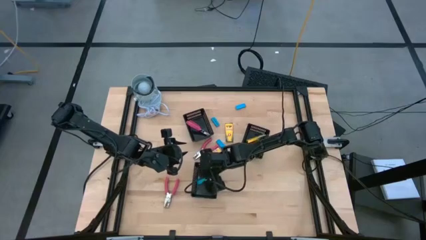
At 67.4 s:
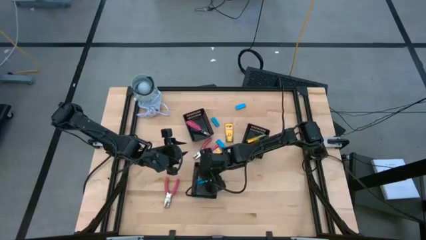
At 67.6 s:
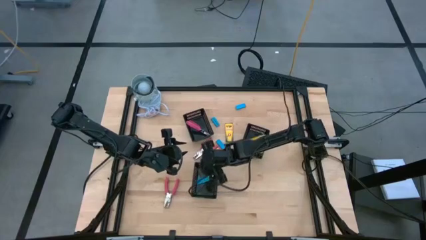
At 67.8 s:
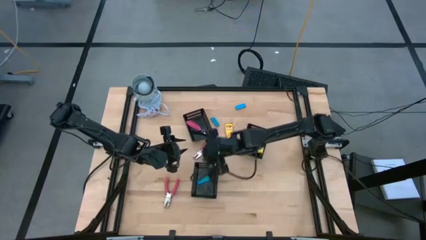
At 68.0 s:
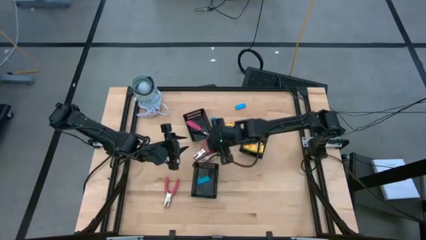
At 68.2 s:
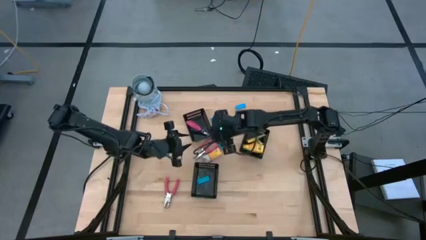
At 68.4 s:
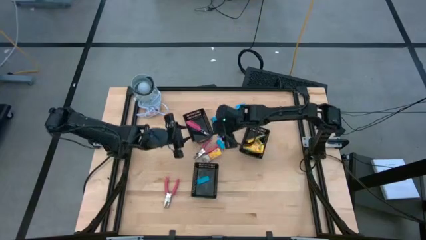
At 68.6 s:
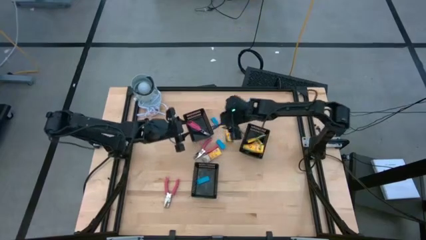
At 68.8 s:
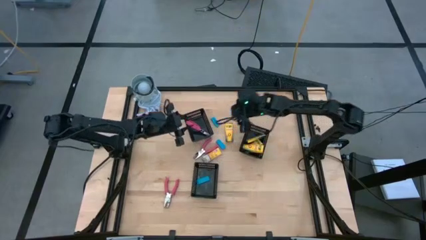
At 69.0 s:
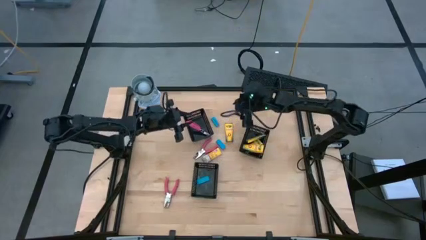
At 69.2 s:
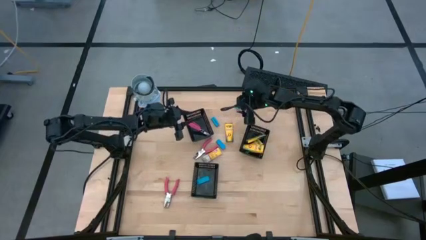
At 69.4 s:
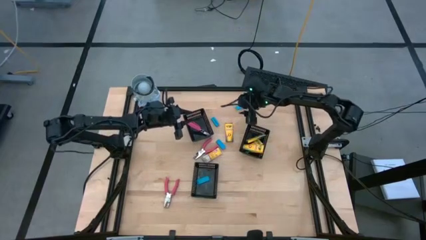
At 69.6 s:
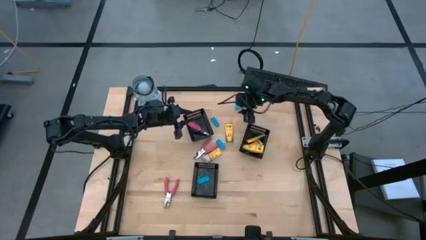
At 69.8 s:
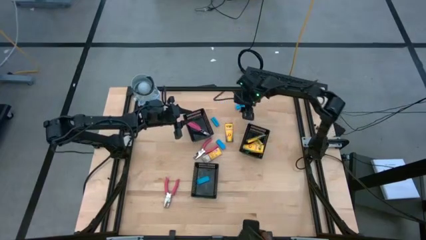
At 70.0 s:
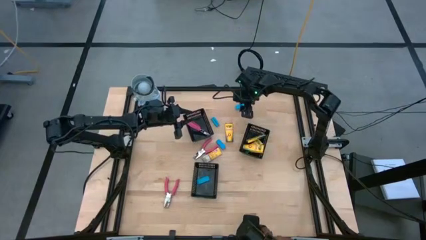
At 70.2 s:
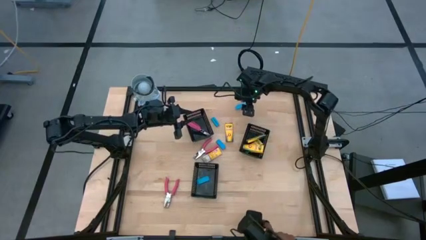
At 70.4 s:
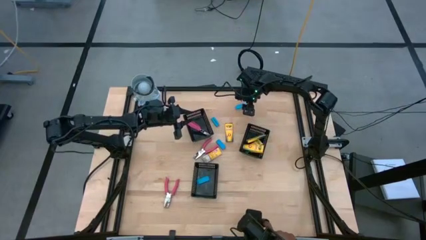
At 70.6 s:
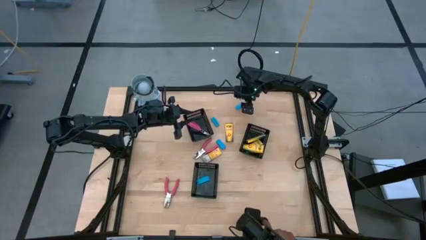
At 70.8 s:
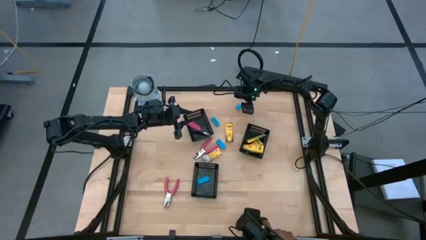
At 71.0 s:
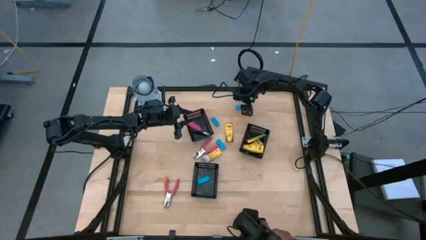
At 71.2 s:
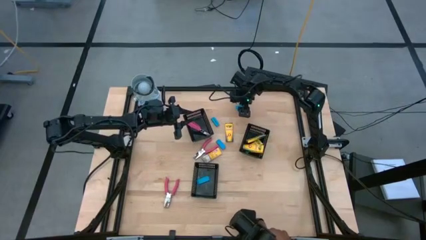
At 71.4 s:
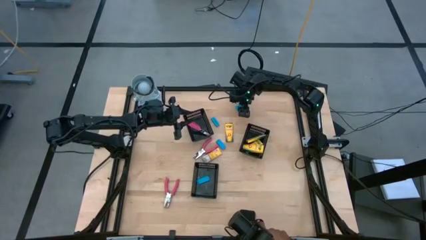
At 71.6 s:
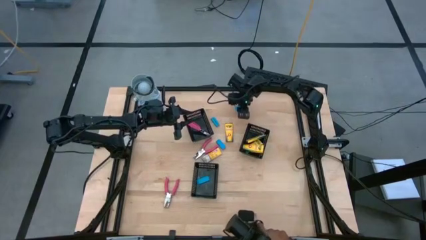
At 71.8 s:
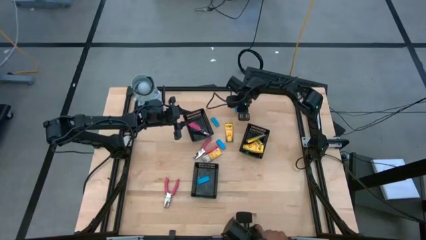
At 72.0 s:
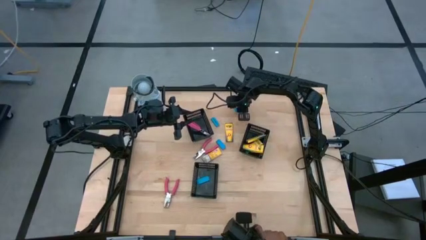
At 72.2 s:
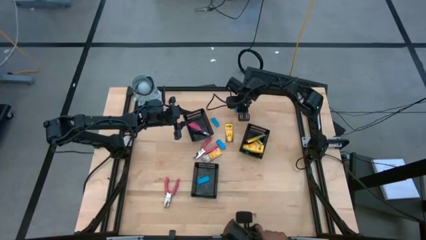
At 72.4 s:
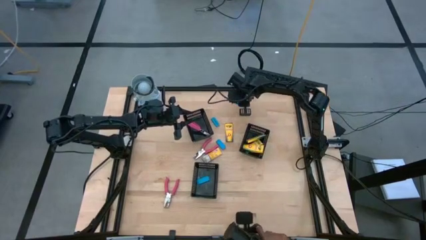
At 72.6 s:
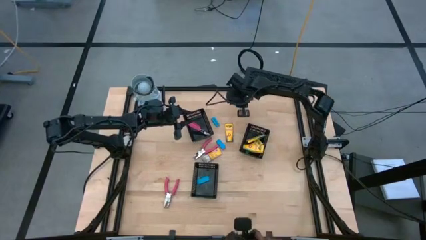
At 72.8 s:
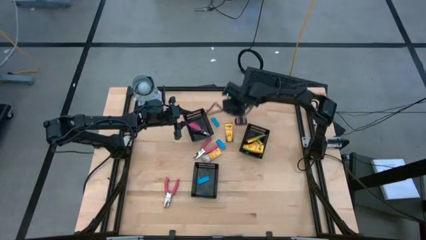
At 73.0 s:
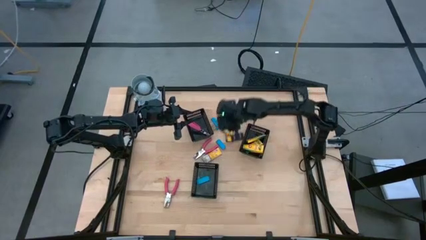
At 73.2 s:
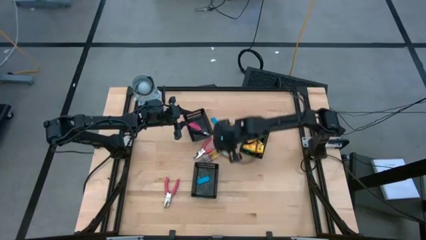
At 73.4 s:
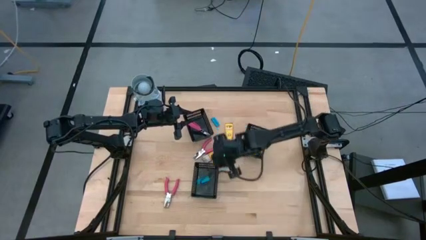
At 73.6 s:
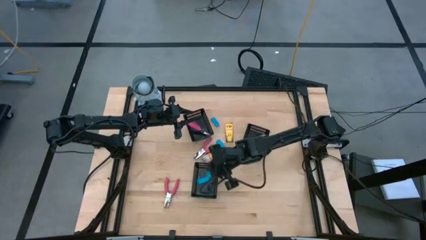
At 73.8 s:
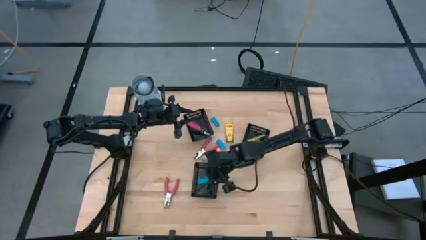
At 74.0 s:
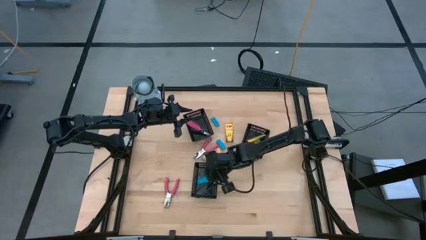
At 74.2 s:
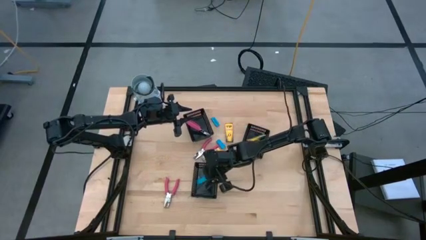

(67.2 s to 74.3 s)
Task: Pick & Place School Supplies
Put the blue eraser into the bottom left black basket

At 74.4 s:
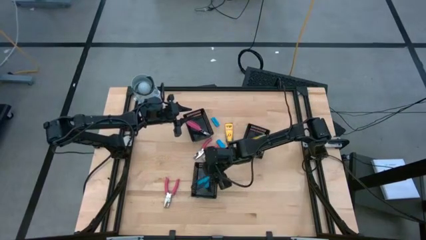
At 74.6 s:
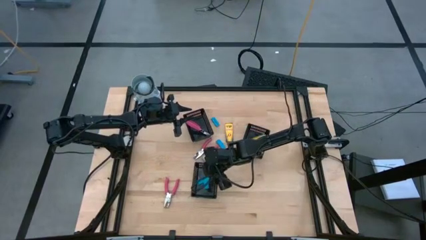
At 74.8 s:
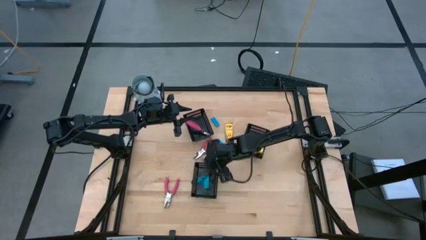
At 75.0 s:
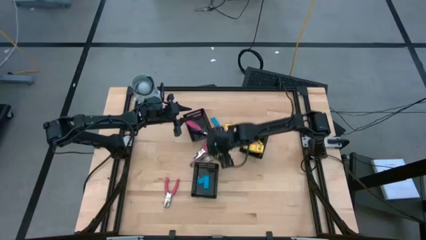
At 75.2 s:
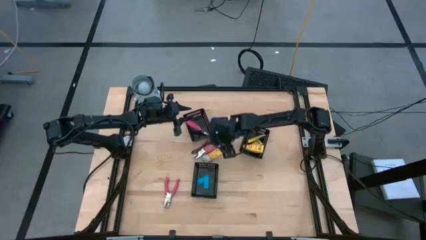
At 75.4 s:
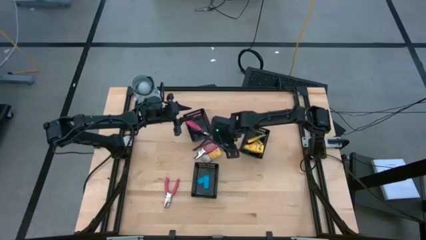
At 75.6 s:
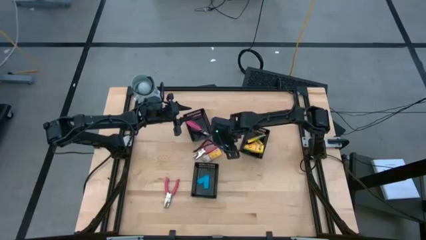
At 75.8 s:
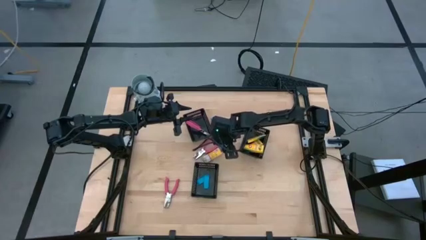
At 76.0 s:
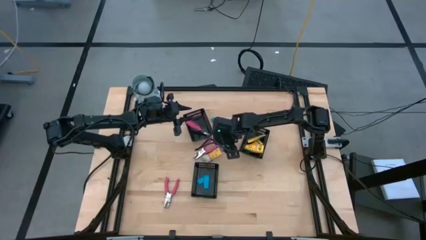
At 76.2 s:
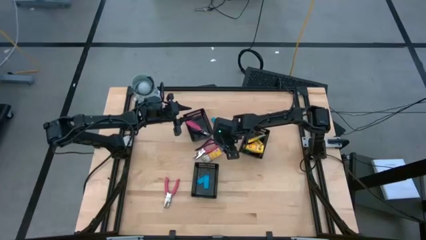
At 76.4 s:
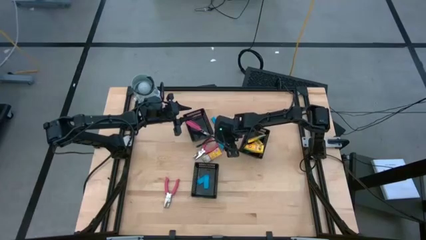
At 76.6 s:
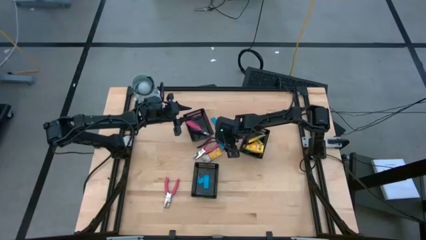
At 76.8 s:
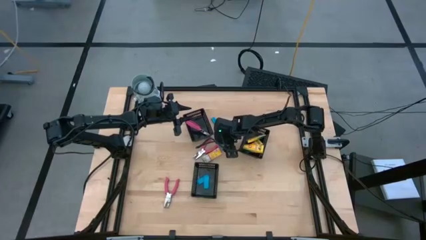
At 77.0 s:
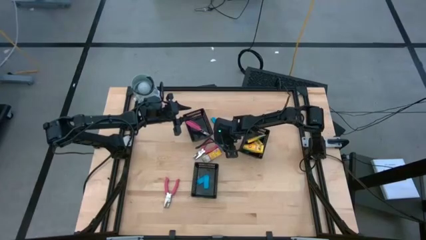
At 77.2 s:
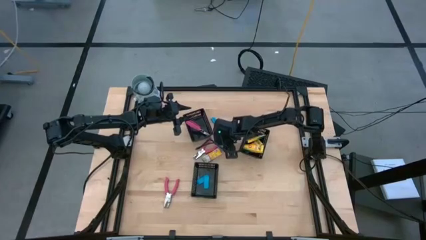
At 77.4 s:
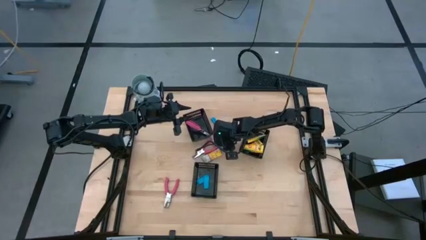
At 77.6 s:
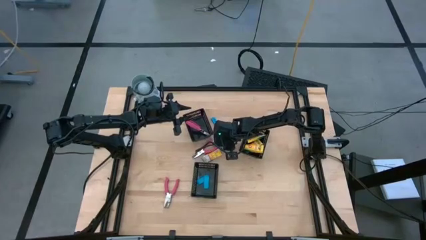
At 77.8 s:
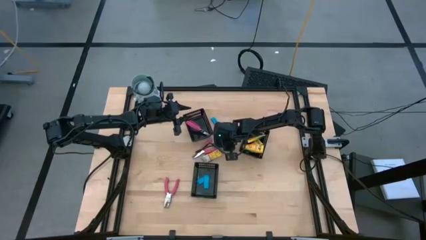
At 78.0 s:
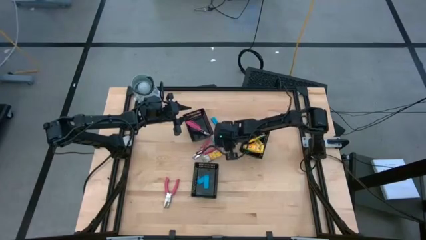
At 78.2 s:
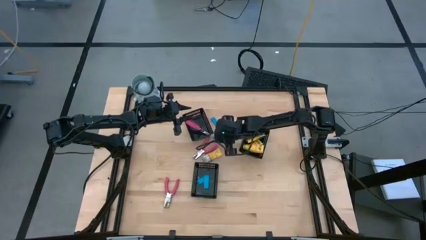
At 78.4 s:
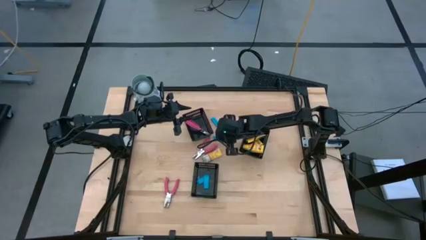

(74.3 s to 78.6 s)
Put the blue eraser into the bottom left black basket

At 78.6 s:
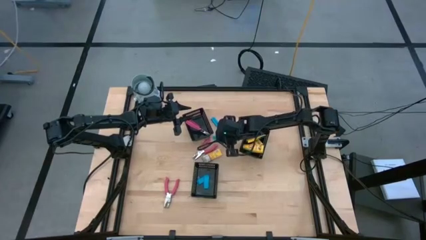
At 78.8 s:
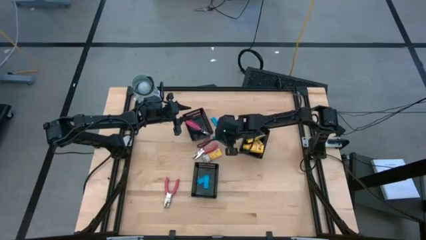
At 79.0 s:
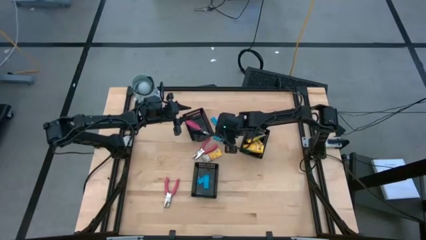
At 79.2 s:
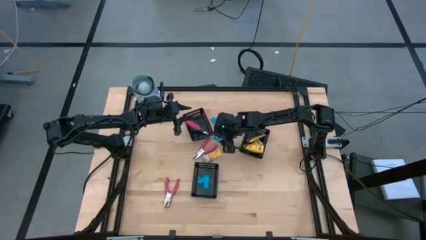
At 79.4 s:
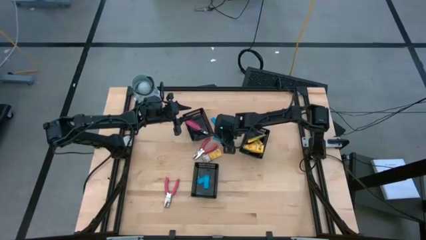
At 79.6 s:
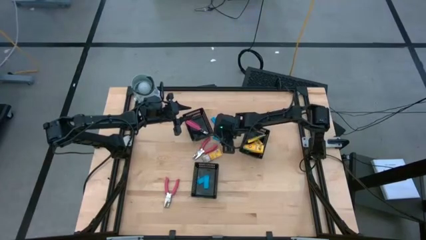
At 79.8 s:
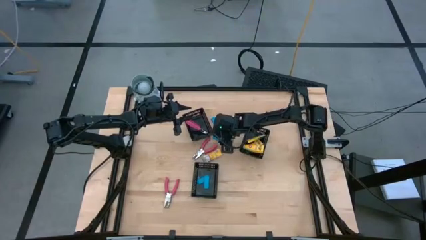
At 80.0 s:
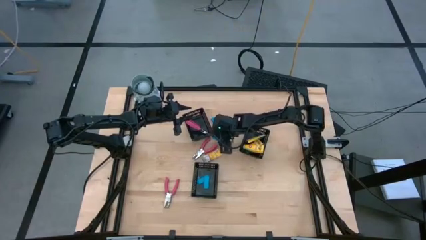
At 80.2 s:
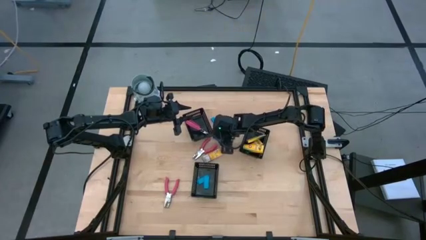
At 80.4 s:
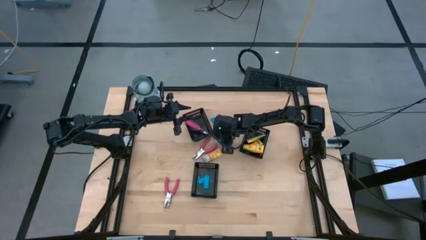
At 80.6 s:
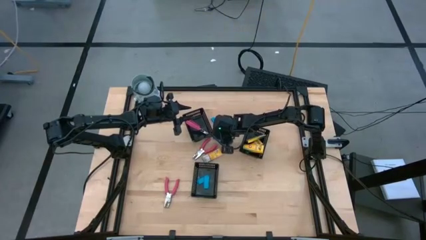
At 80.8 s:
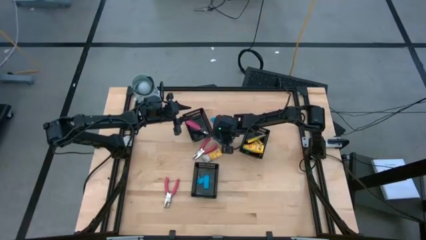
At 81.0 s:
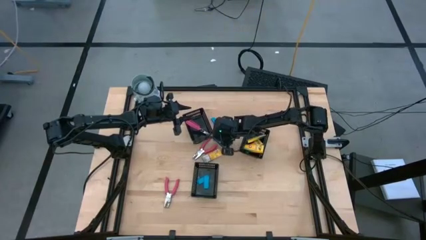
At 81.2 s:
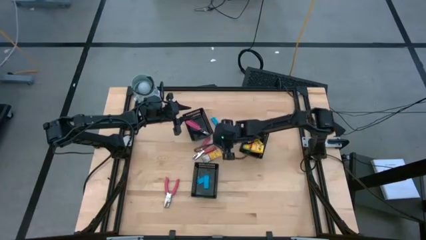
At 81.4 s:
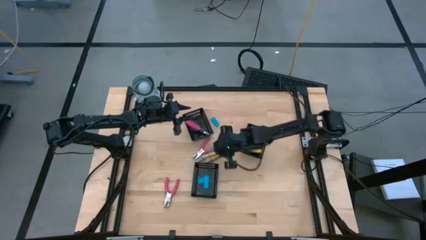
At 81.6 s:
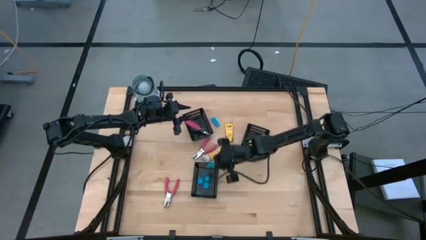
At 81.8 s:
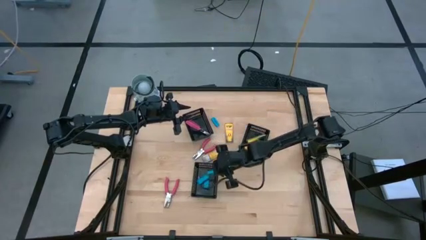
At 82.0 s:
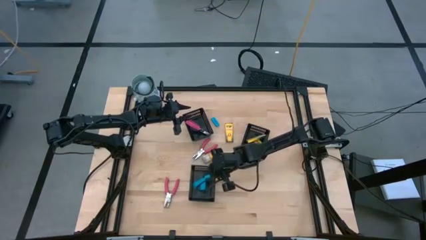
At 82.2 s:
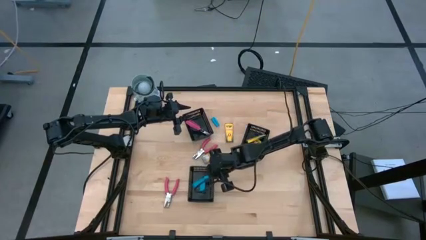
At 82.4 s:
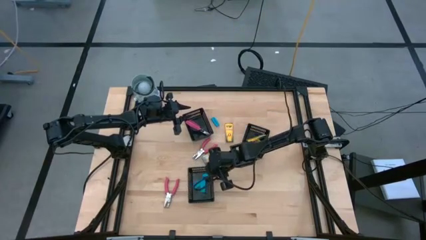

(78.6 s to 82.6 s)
Put the blue eraser into the bottom left black basket

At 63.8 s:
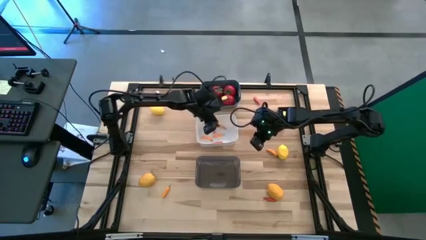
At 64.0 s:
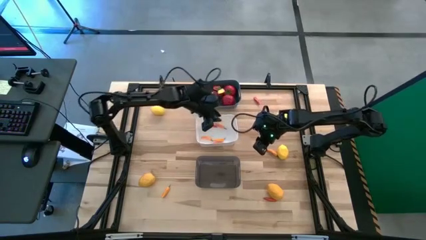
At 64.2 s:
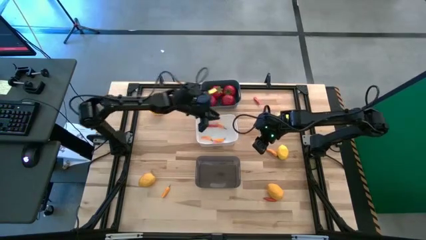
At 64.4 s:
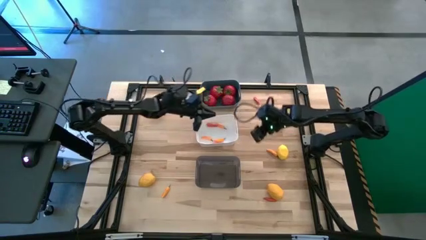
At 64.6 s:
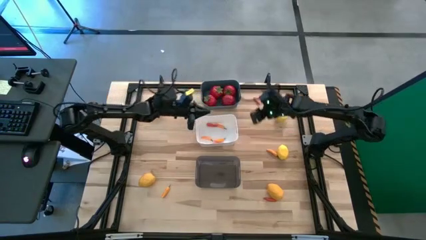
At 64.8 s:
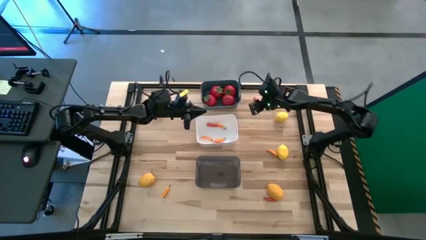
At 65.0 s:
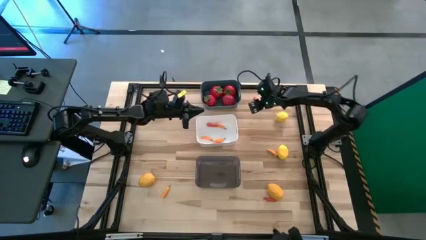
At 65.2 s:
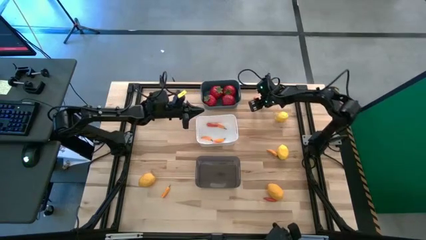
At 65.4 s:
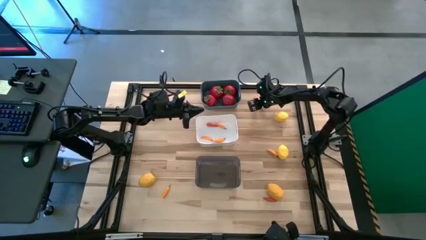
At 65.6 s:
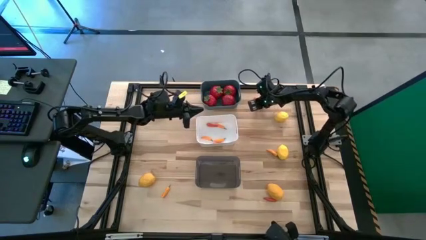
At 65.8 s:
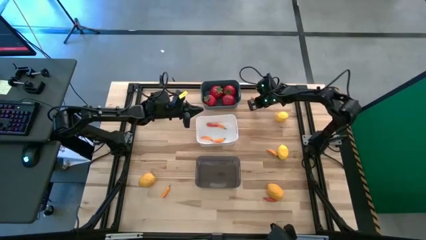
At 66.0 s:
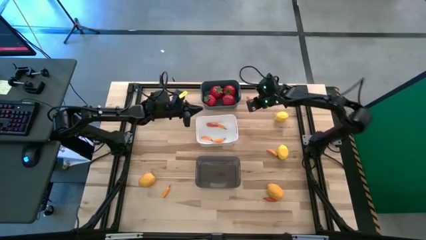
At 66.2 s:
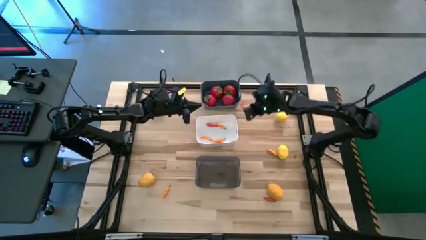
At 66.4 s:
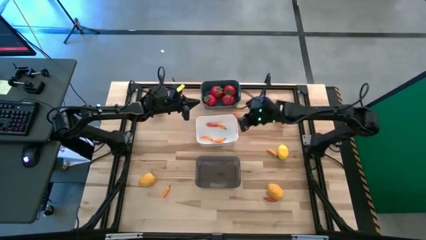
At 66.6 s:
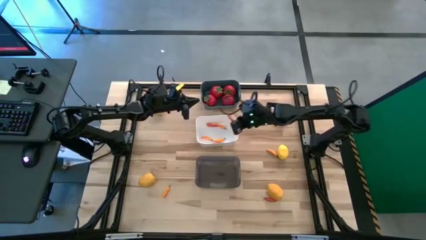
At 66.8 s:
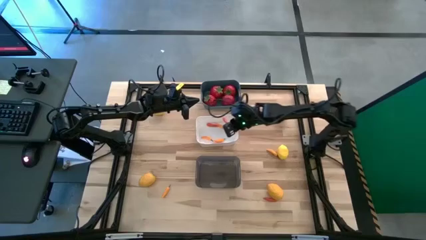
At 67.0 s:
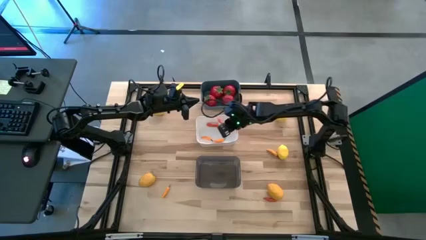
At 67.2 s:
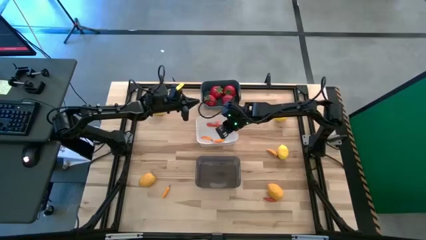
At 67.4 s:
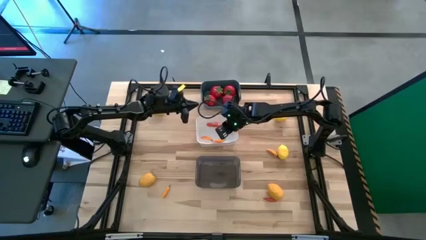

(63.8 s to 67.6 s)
Task: Sort produce into baskets
Put the red chili pepper into the white bin
